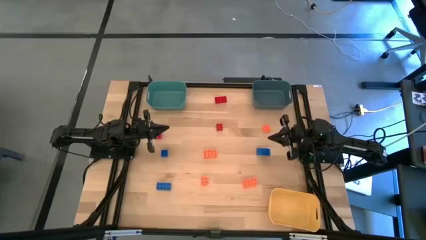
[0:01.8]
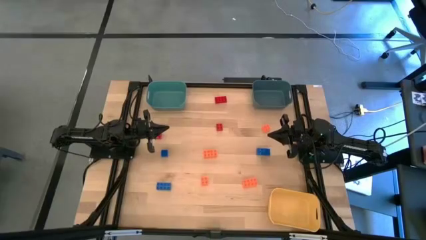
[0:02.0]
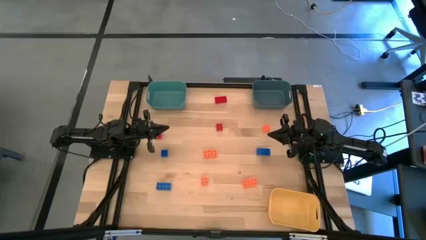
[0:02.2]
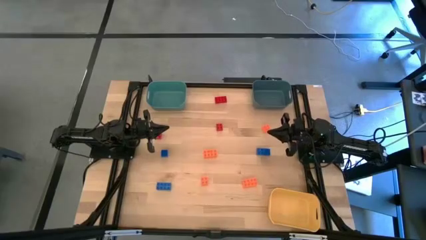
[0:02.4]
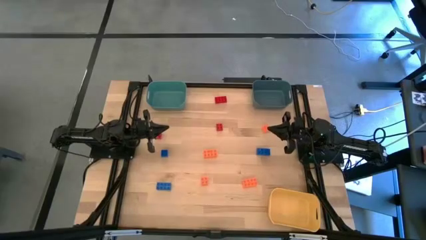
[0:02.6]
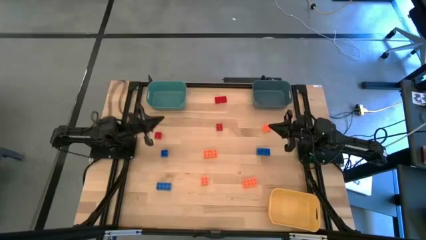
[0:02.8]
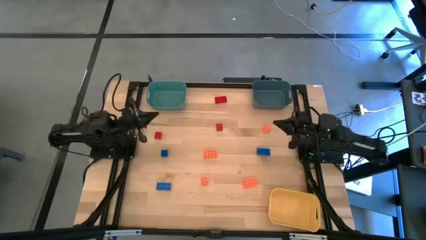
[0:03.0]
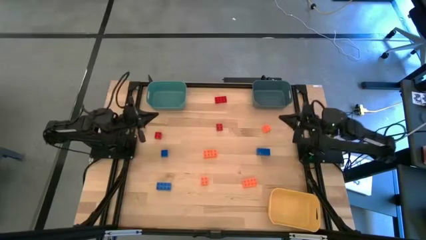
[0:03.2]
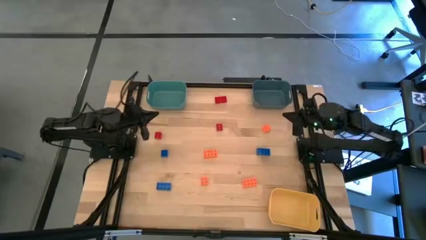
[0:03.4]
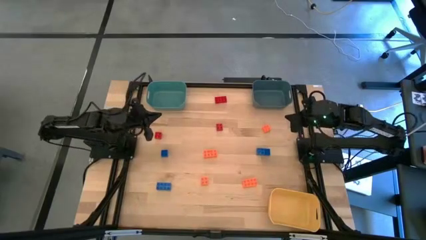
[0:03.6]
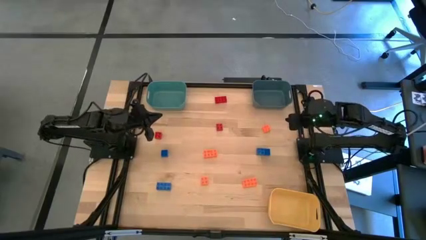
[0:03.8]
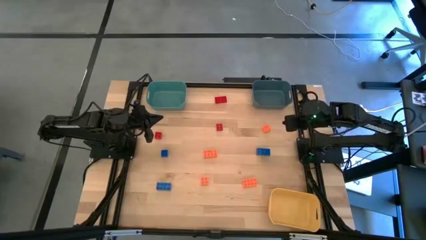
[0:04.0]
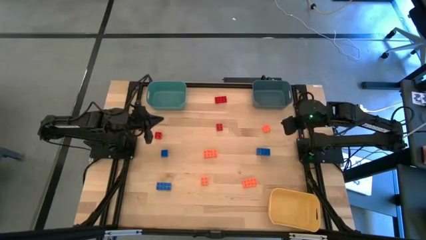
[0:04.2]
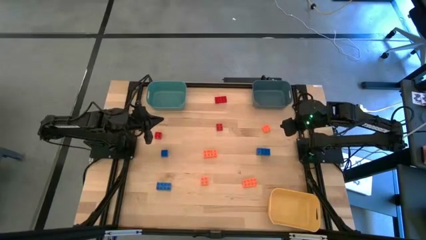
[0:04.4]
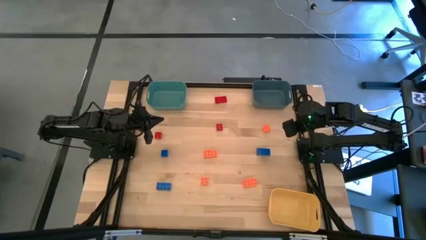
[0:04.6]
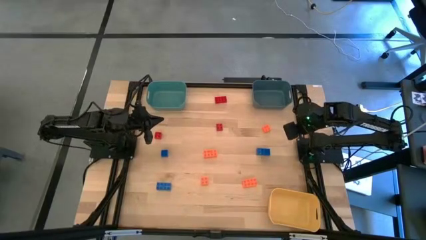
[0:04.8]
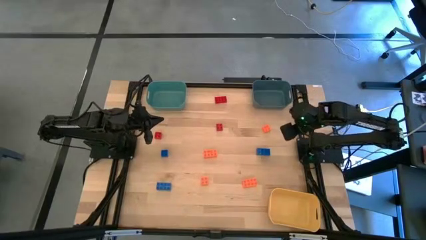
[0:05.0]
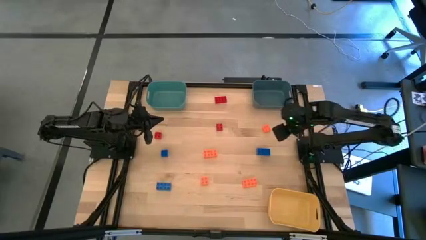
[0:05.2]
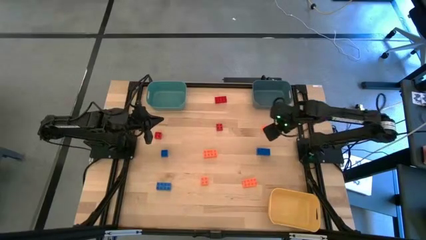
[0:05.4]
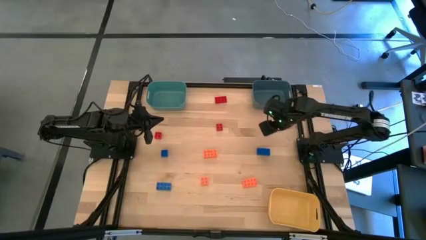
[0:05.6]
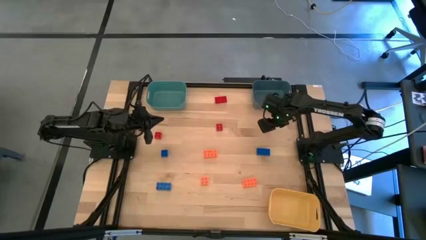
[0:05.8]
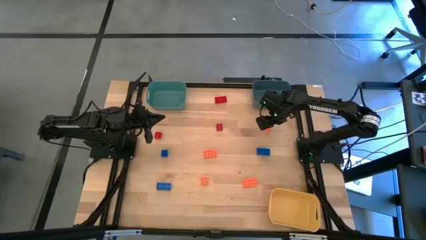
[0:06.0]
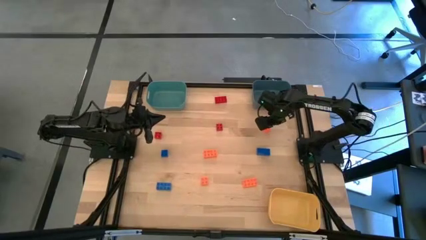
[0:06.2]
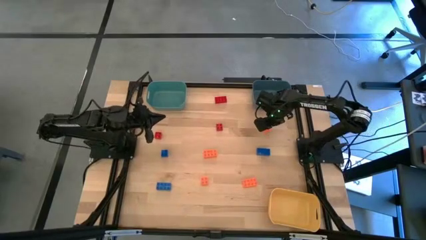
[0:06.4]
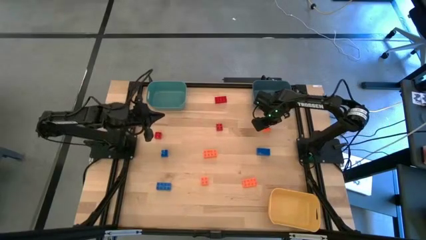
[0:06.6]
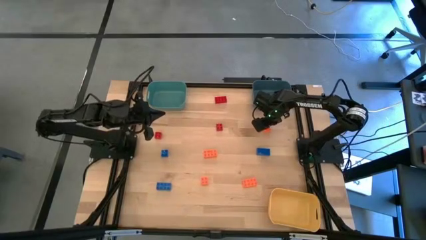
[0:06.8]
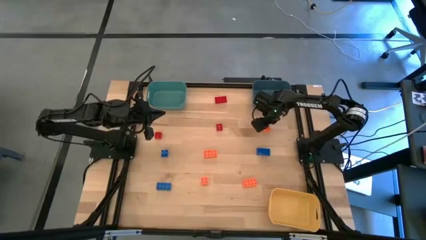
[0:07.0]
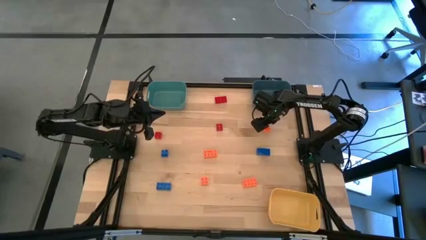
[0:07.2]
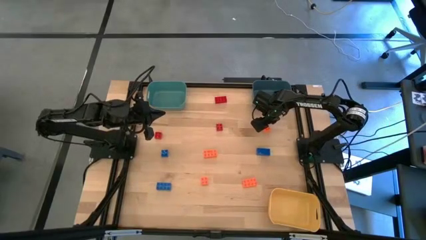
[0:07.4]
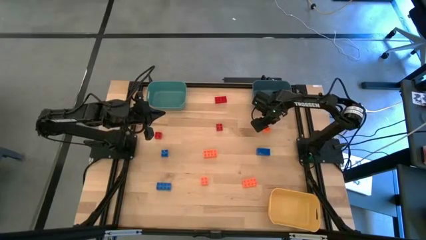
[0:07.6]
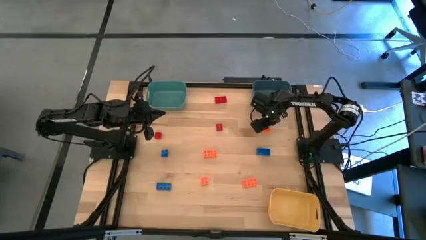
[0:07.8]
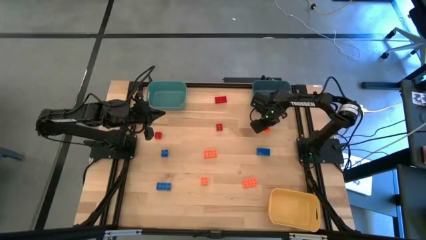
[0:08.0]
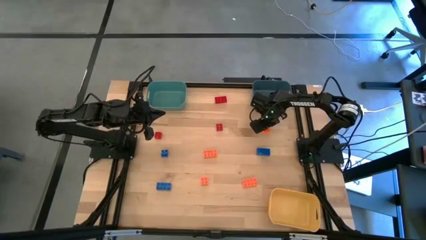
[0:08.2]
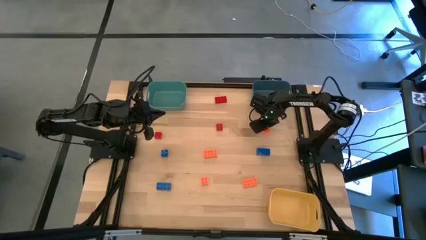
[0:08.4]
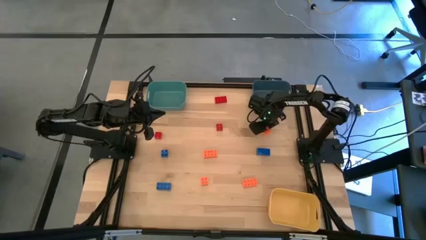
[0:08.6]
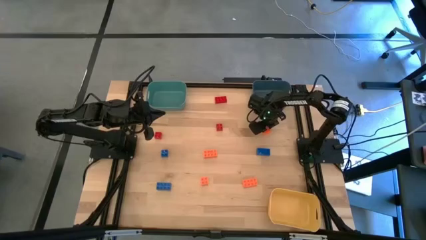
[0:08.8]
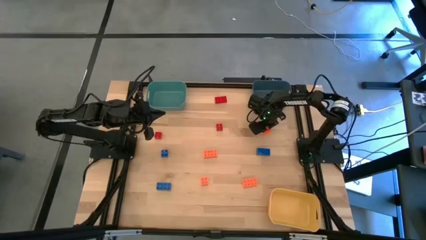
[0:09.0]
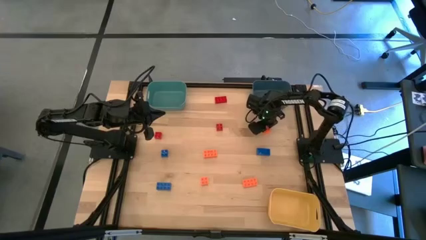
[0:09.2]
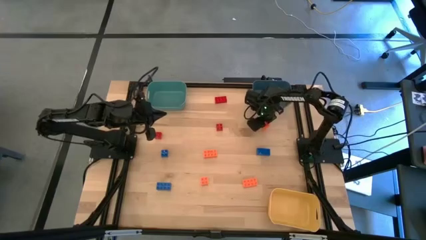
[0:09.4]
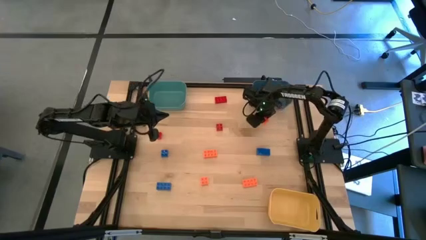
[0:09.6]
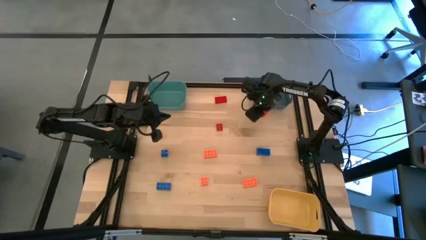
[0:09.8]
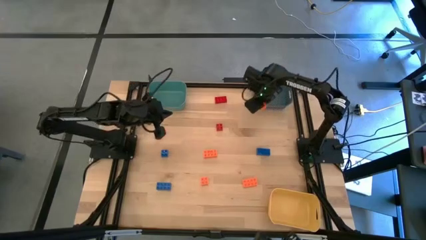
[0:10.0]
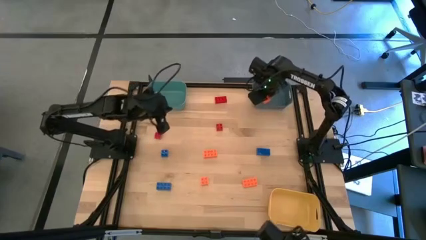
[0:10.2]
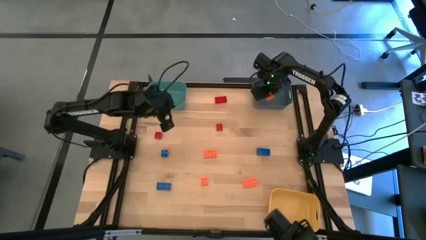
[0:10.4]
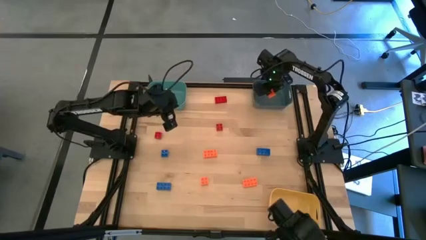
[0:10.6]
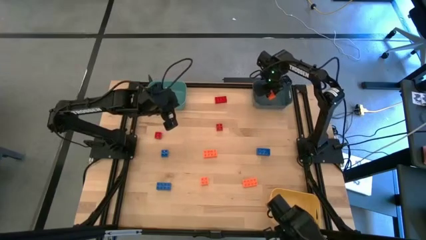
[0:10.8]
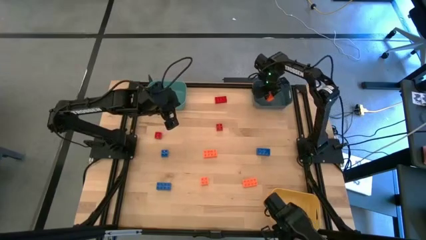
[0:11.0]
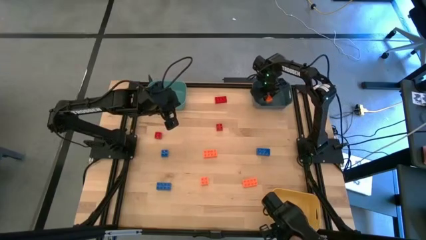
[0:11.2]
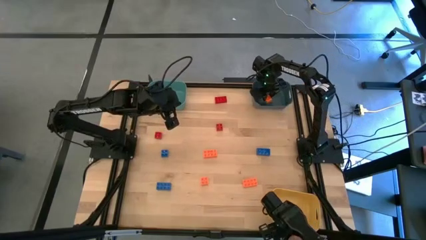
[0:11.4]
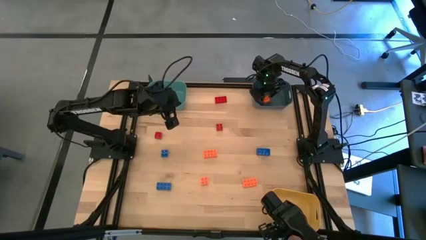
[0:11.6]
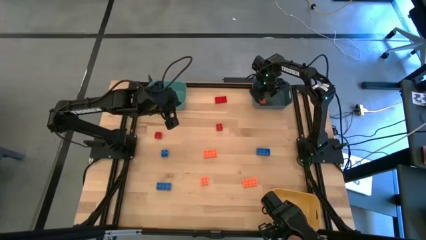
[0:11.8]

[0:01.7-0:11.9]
Task: Sort & place blocks by color
Put the orange game piece into the dark blue bin

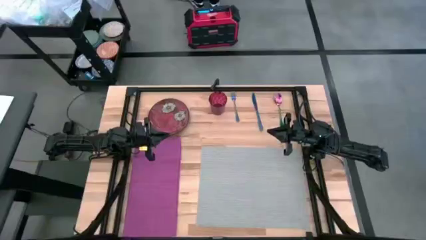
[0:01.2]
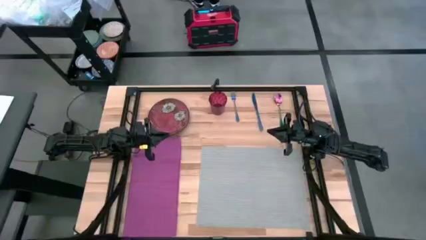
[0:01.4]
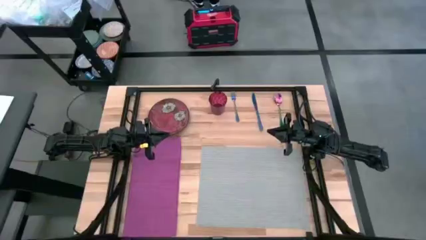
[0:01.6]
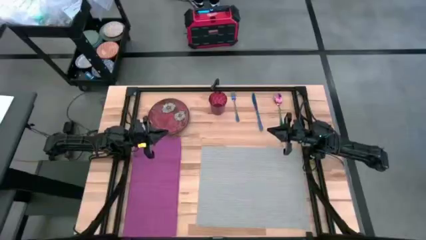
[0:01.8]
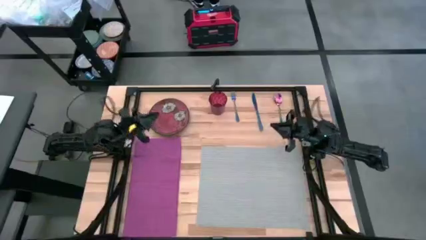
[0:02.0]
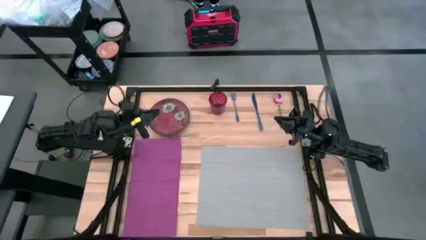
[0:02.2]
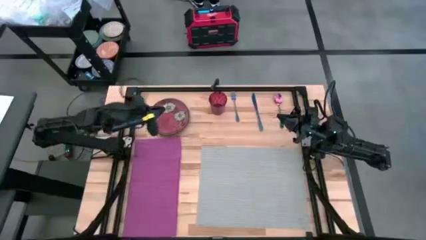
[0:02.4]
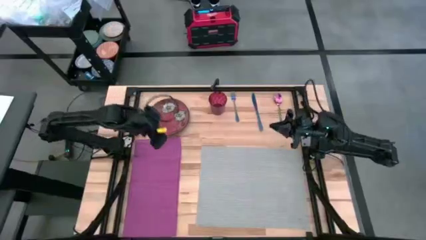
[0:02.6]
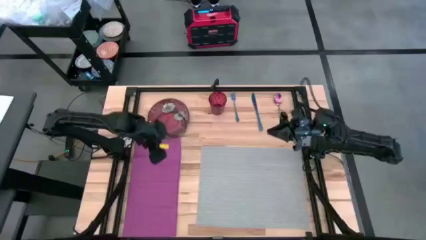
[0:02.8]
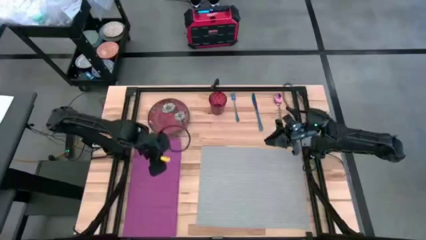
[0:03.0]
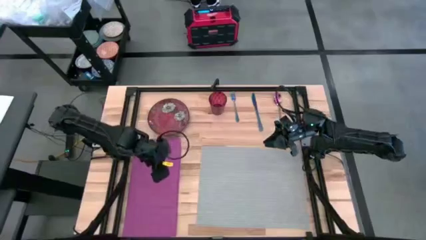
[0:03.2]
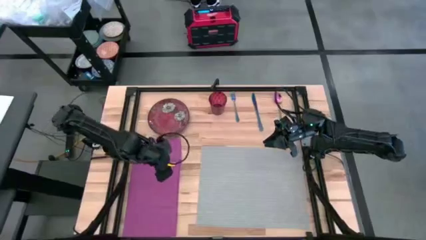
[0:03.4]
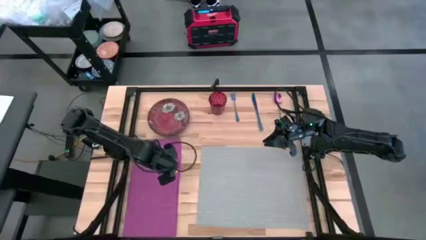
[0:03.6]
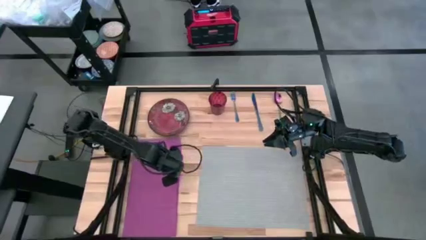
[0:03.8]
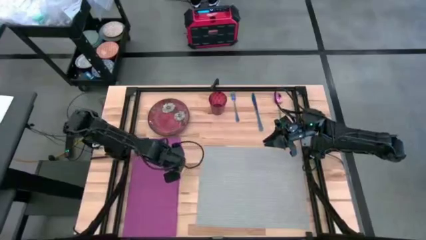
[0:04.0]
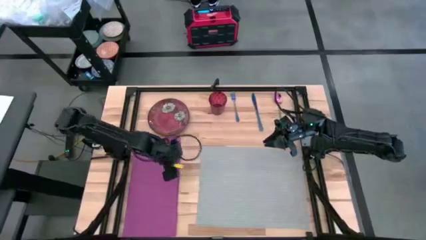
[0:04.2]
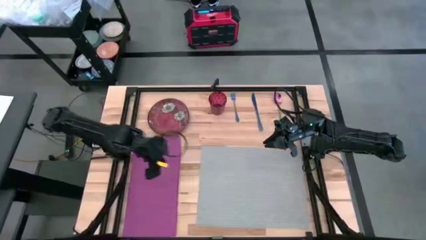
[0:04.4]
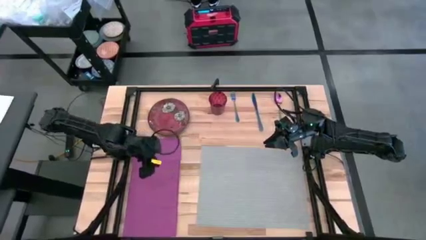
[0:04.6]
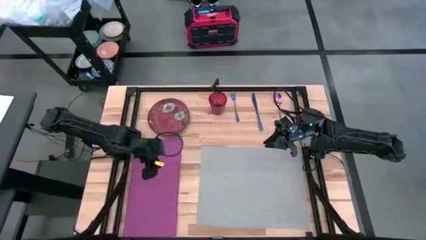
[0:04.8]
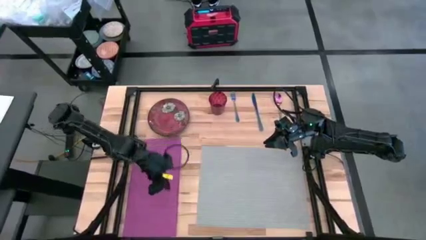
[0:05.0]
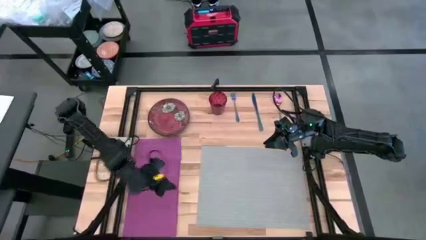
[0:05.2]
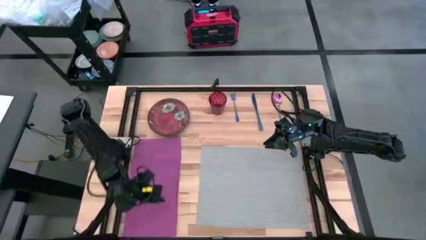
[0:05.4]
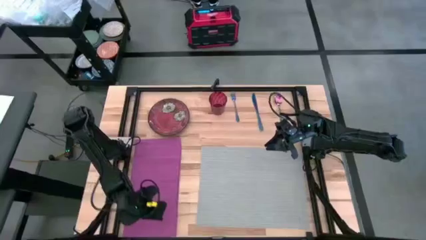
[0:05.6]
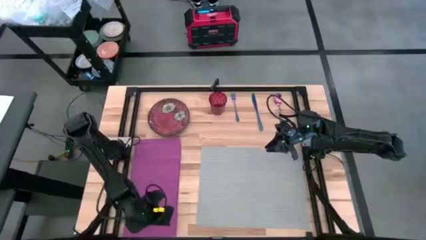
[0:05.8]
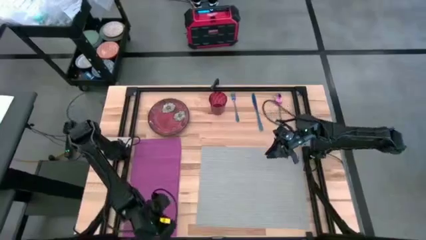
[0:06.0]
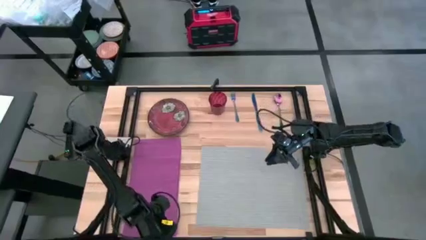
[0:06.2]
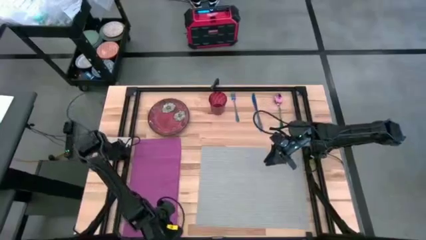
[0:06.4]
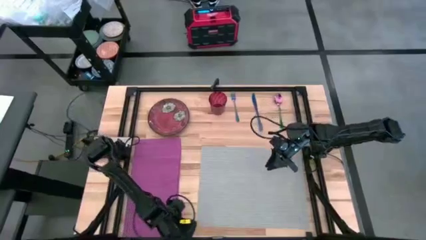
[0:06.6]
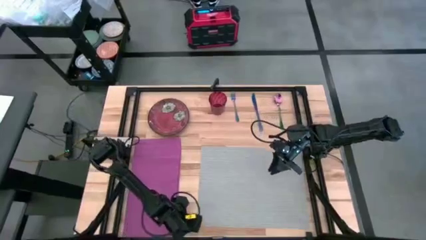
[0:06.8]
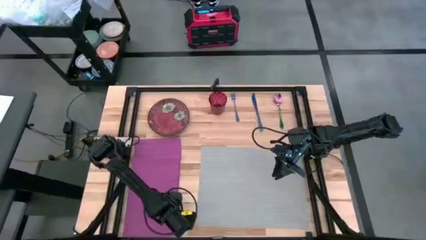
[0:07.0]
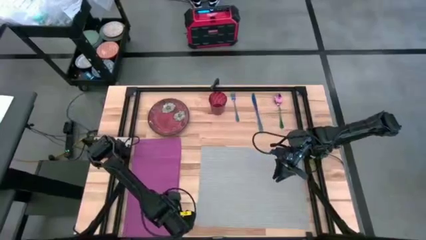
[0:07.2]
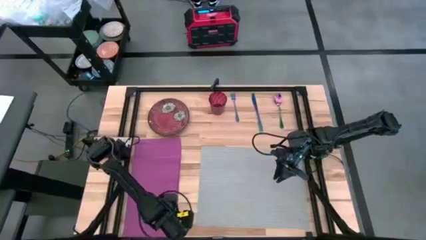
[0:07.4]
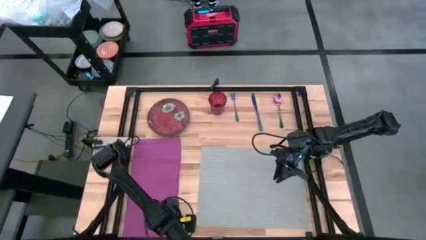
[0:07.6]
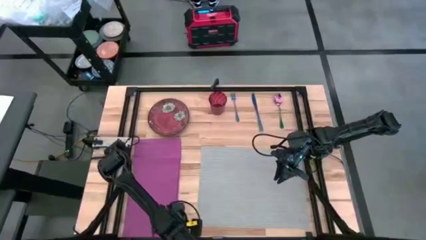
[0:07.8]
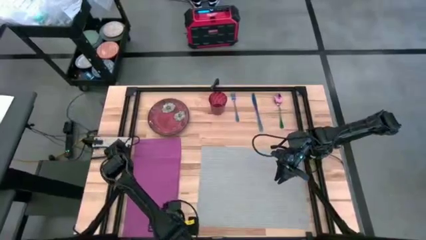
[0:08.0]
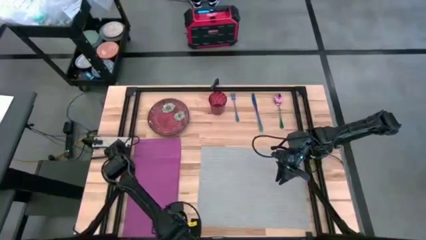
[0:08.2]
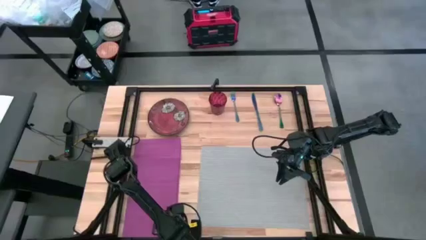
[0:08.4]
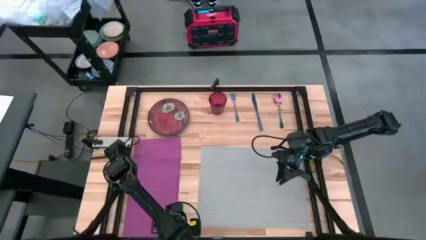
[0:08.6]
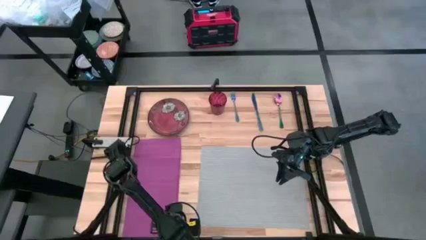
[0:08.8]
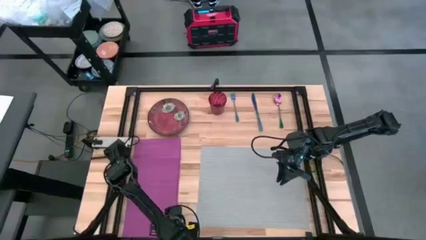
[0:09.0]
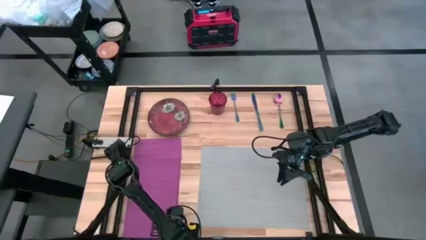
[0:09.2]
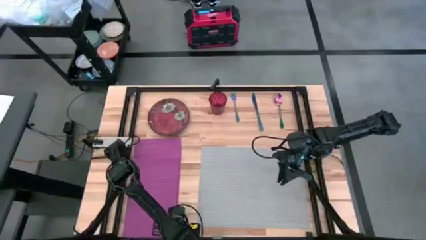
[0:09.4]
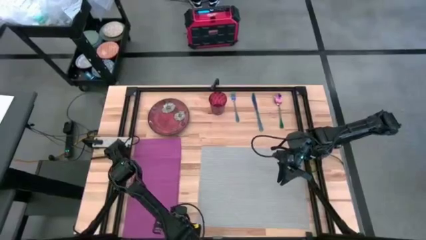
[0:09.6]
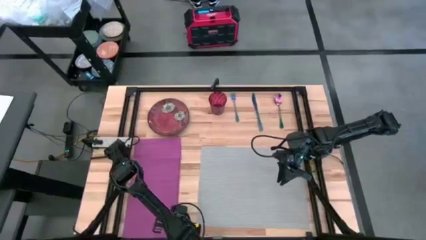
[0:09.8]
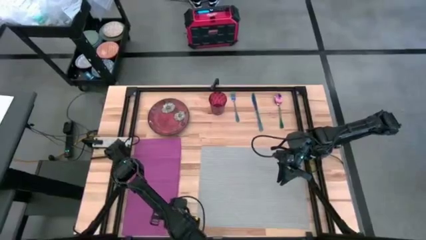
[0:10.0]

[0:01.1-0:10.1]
Task: Set table place
Fold the purple napkin
